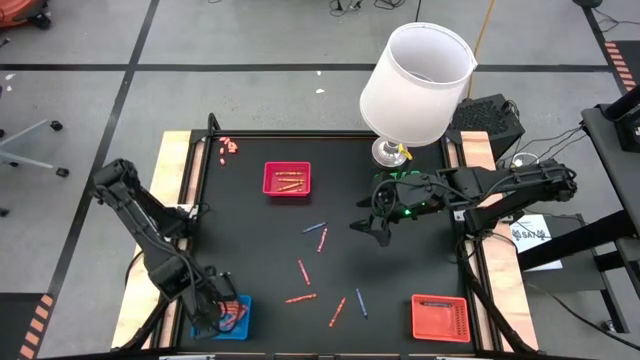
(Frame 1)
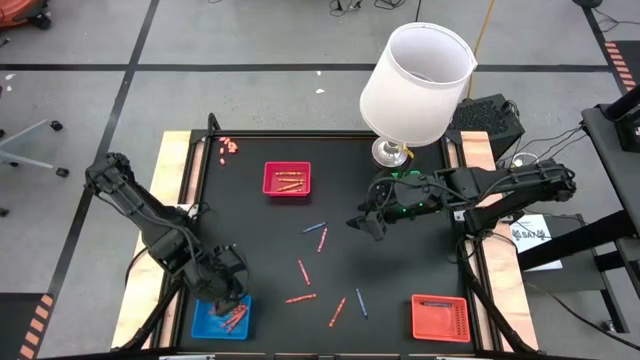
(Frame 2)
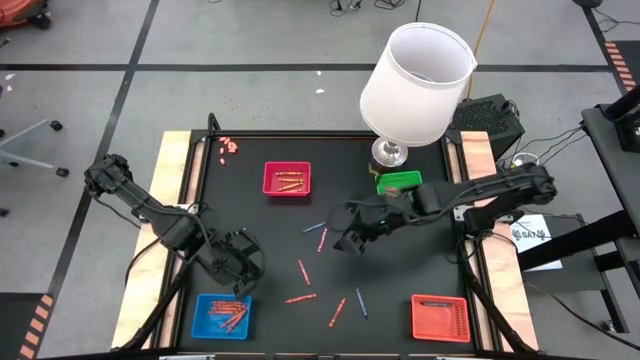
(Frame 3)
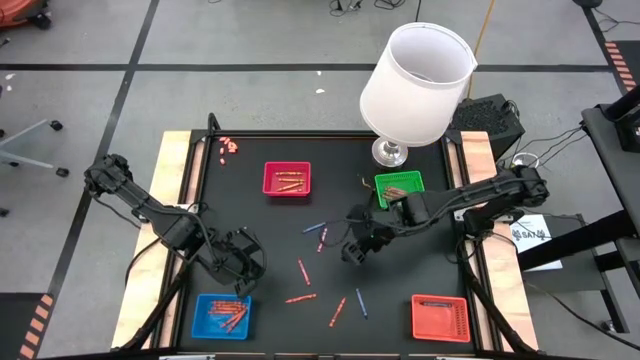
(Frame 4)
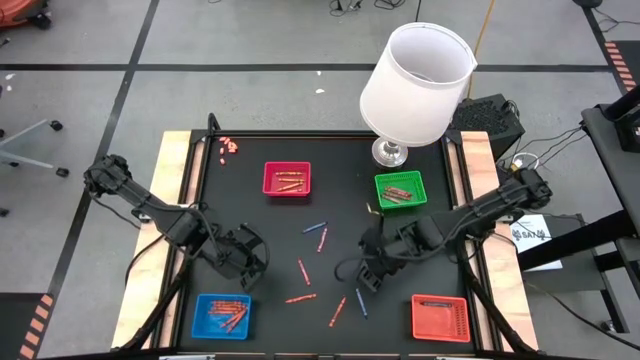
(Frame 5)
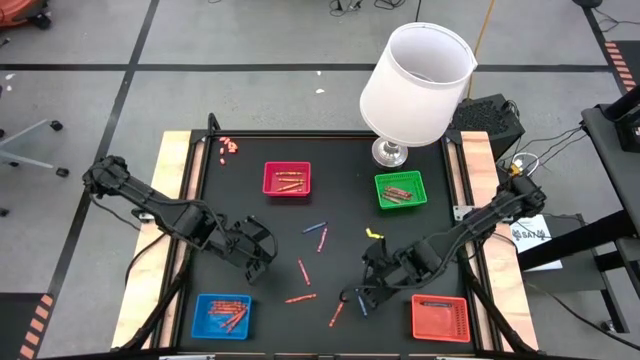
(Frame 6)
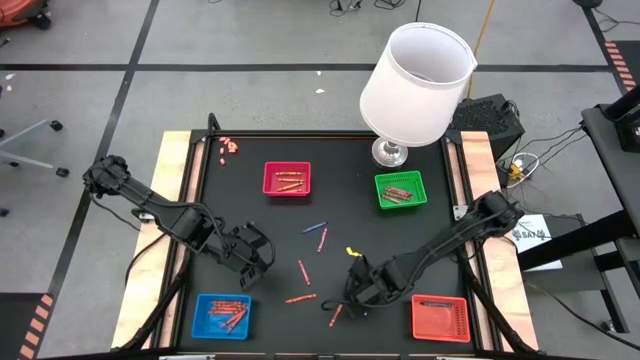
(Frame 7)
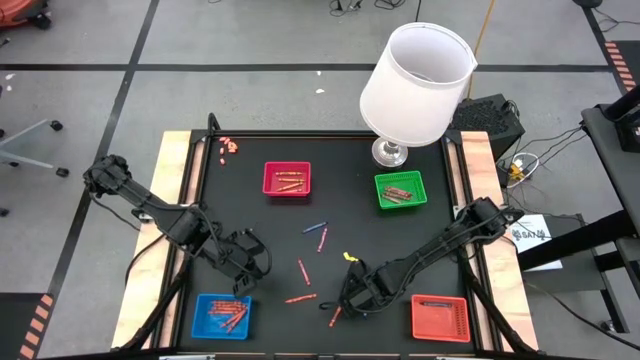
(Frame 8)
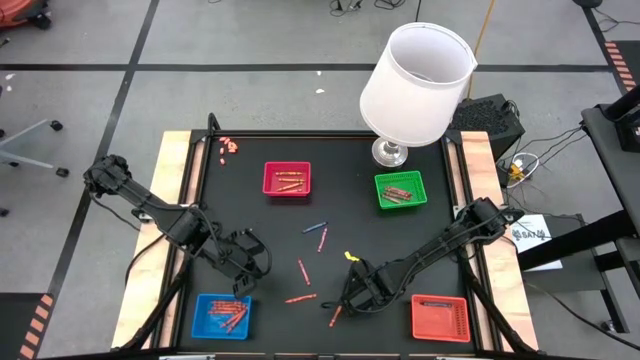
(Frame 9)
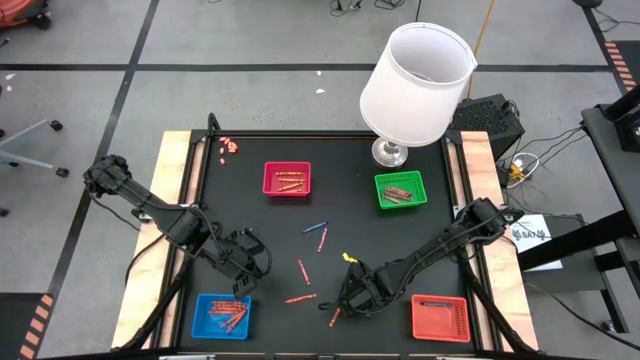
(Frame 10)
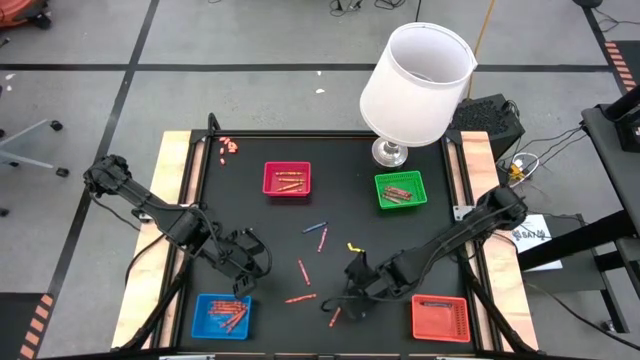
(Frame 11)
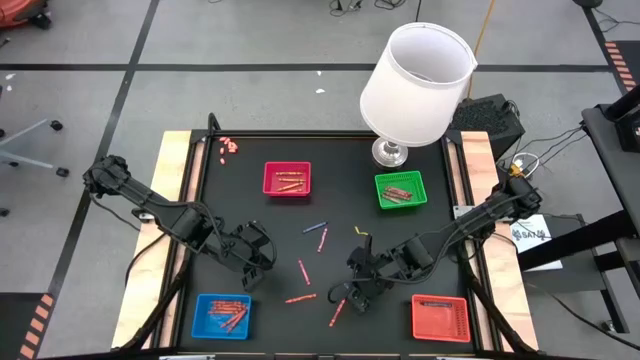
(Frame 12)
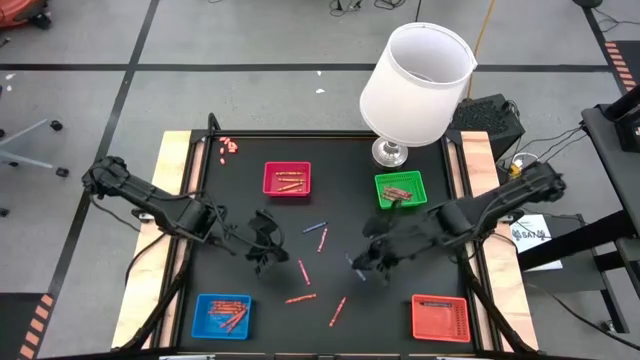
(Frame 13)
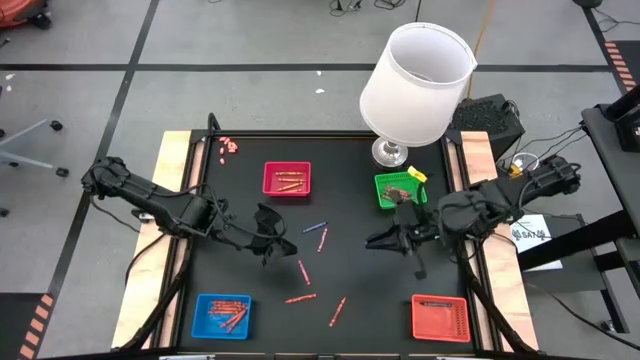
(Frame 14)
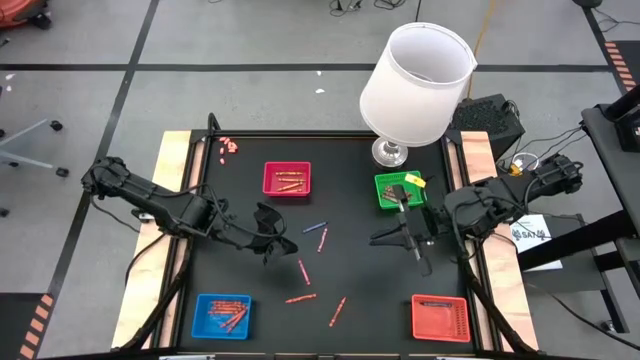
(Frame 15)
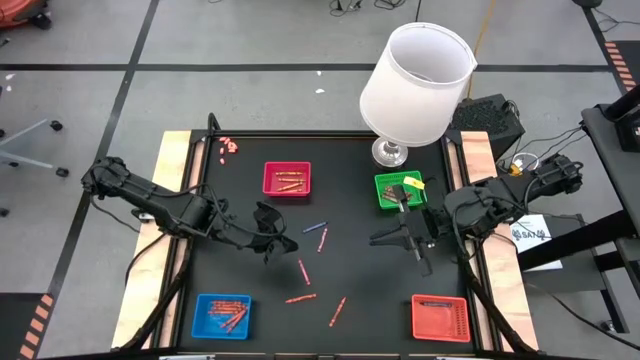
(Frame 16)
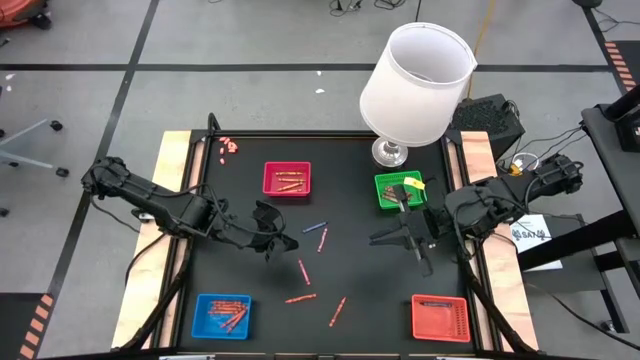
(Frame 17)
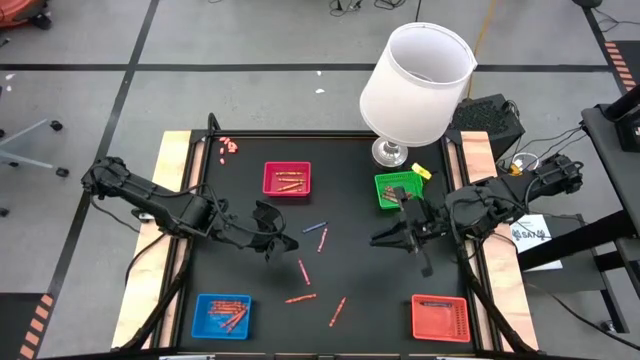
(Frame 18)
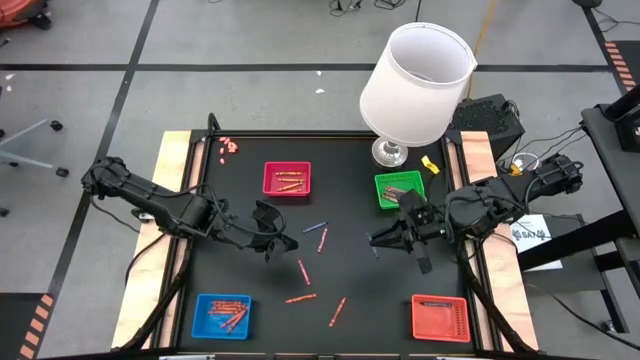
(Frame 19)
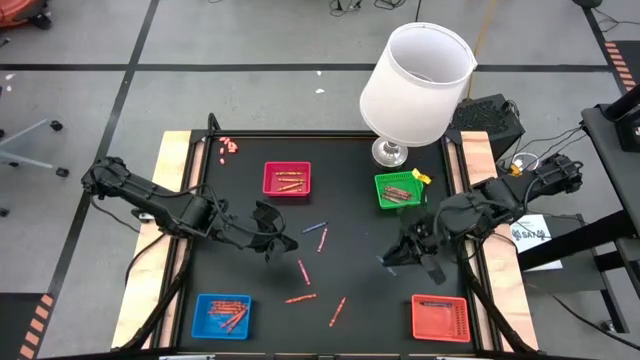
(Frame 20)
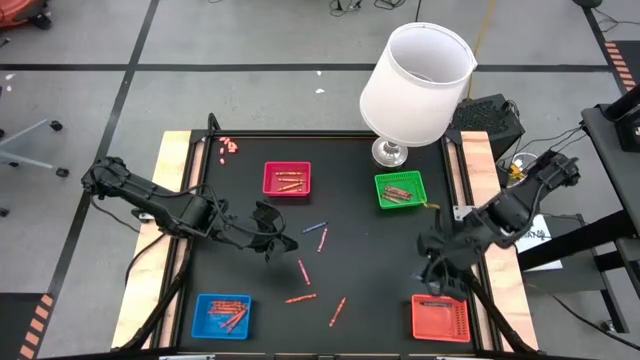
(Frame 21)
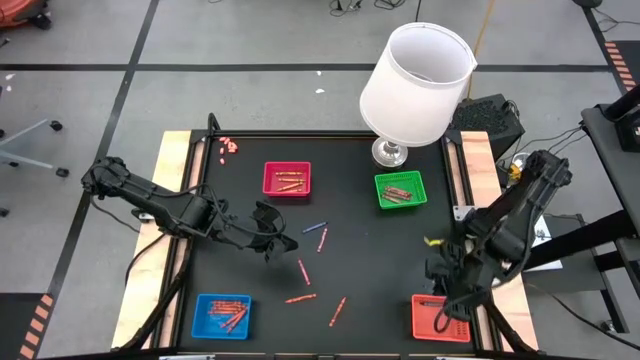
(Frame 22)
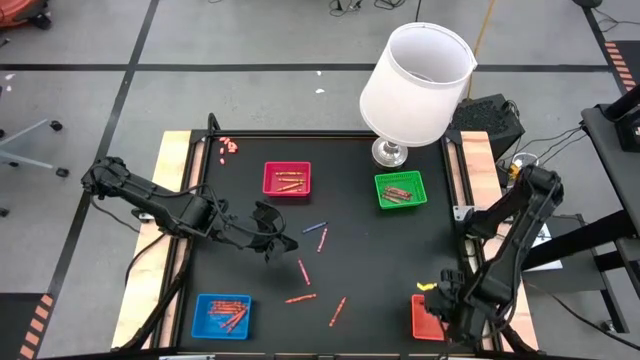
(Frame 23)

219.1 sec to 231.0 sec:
Task: Sort crayons
Put the blue crayon into the orange basket

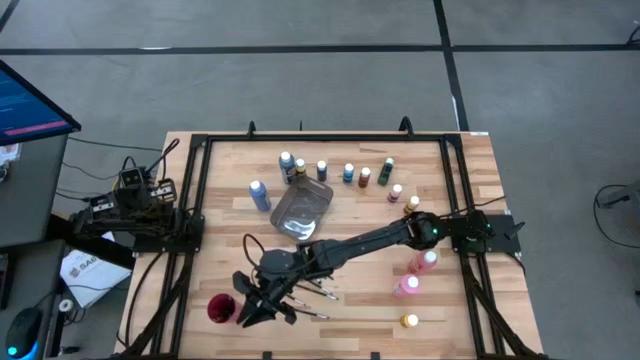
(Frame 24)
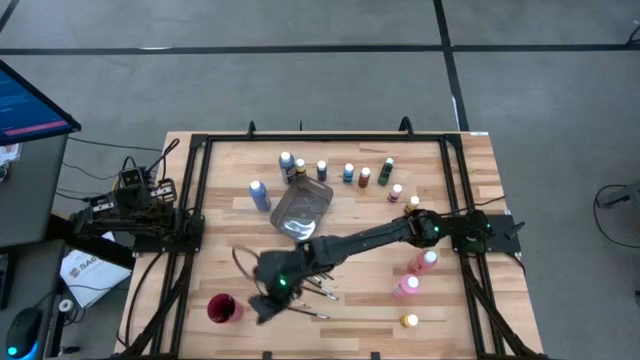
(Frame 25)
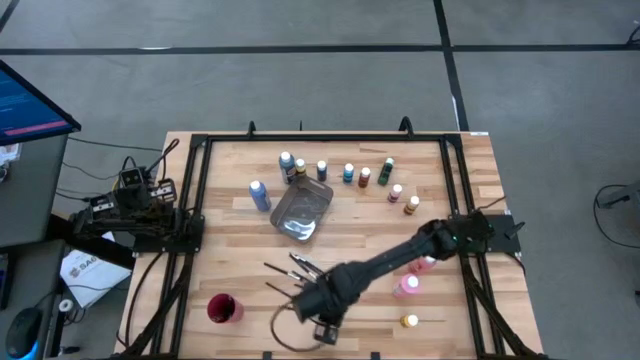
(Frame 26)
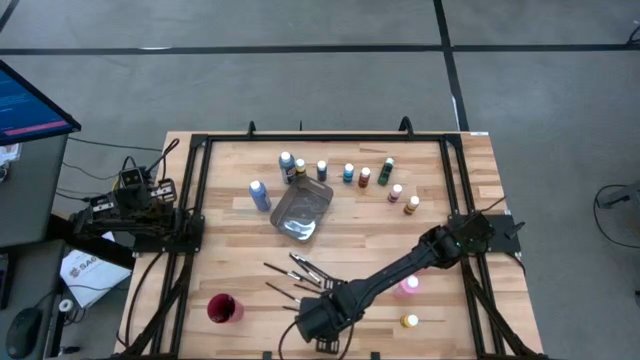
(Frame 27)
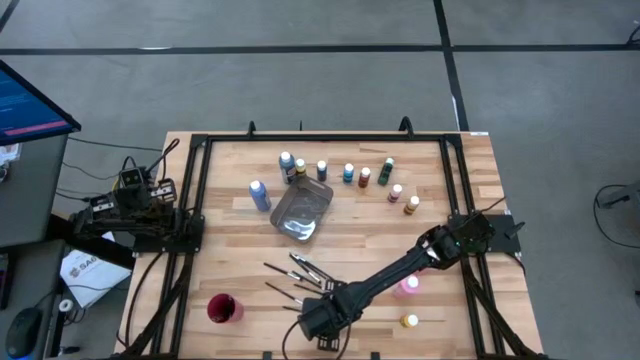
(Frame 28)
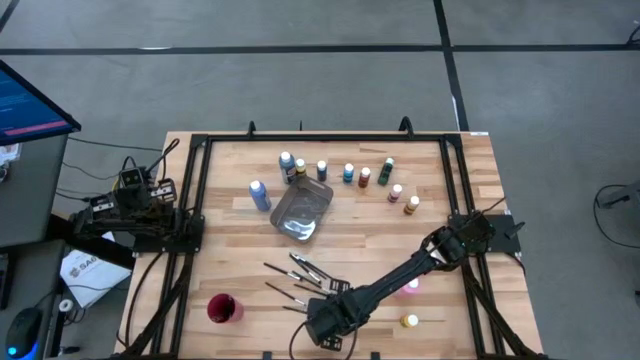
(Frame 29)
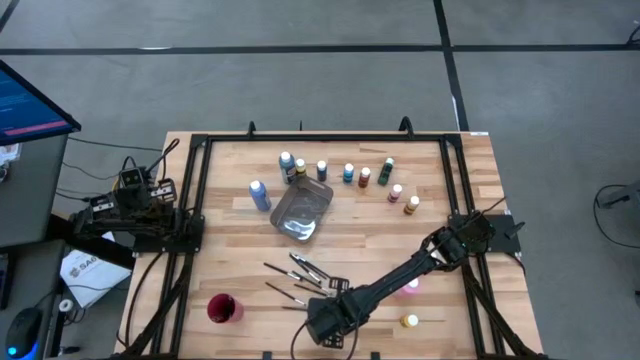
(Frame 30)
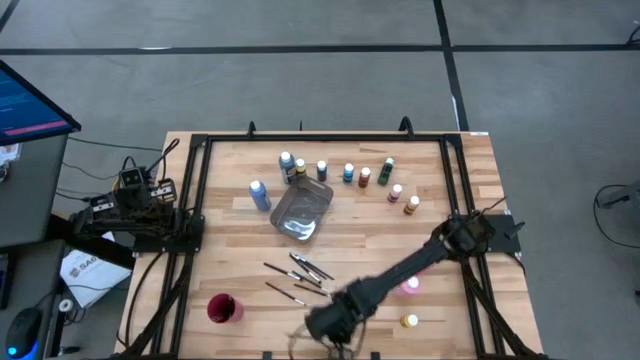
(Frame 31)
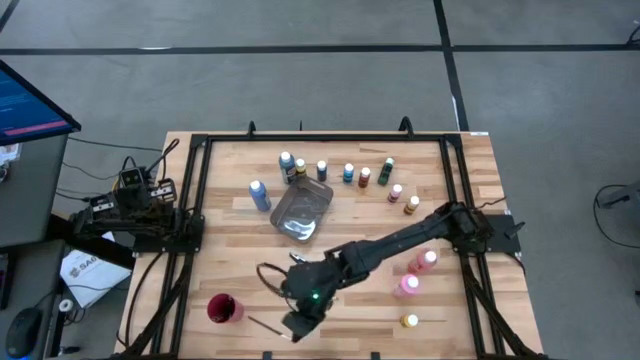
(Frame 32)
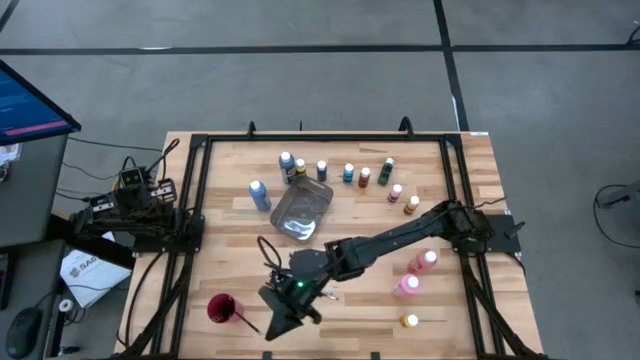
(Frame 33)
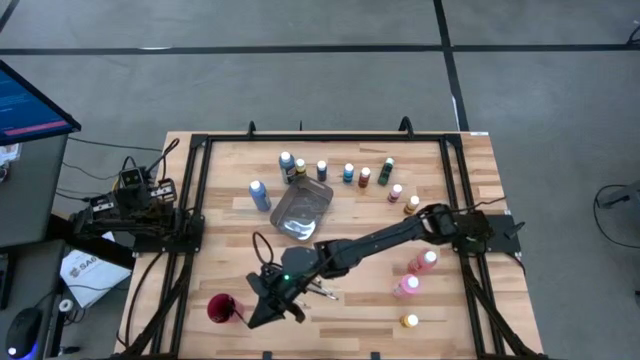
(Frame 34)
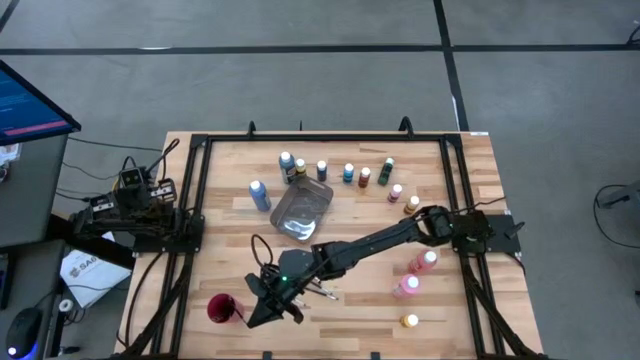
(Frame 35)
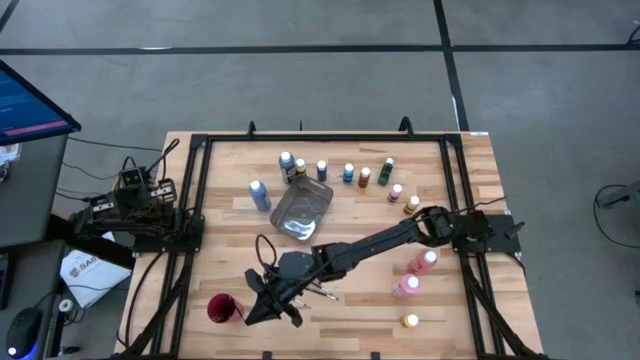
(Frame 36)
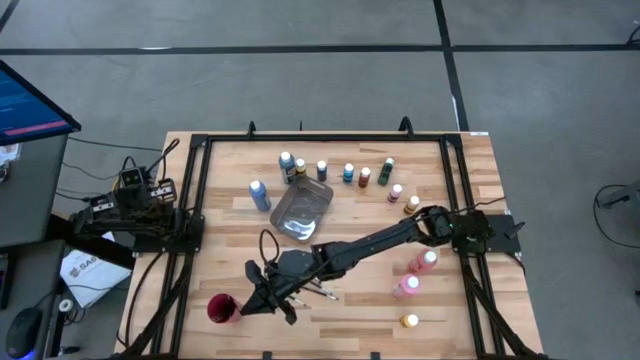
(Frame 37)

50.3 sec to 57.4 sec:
Task: Pick & Place Paint Supplies
Put the silver paintbrush into the red cup
